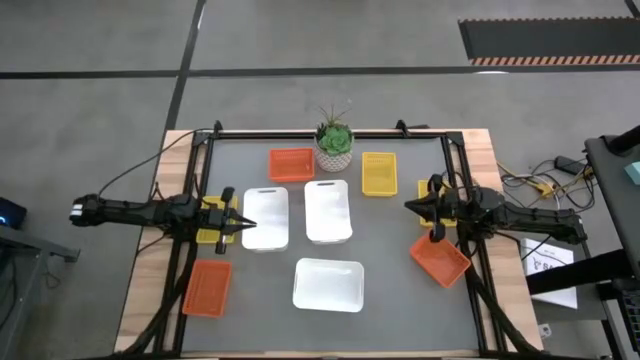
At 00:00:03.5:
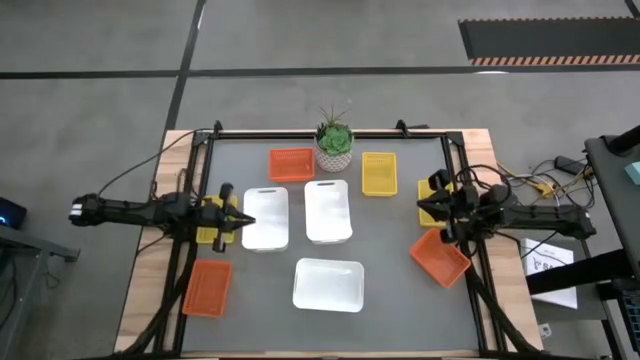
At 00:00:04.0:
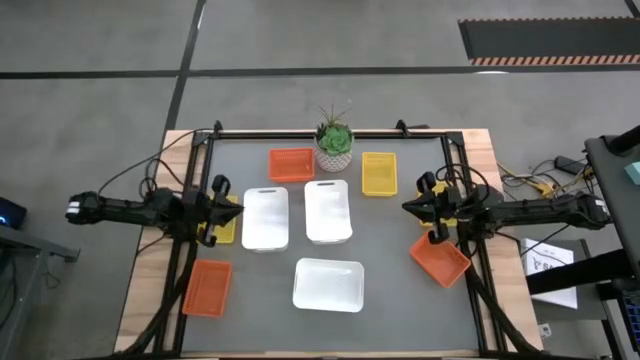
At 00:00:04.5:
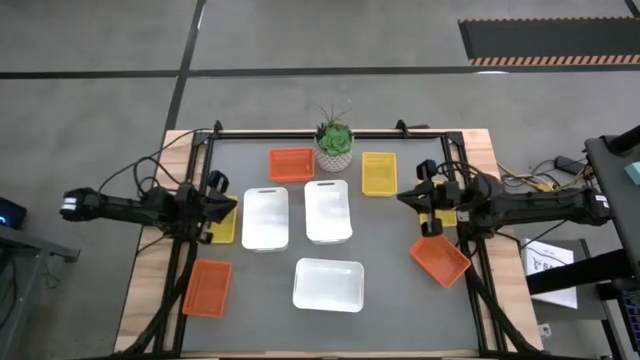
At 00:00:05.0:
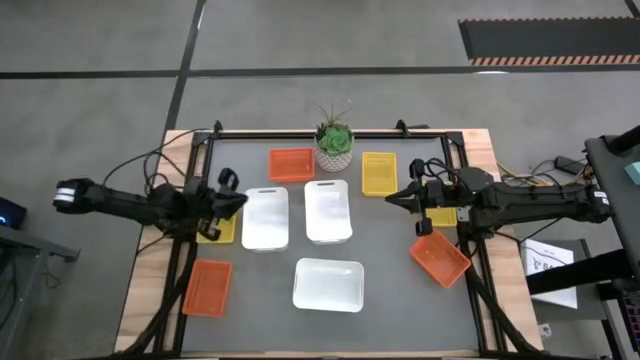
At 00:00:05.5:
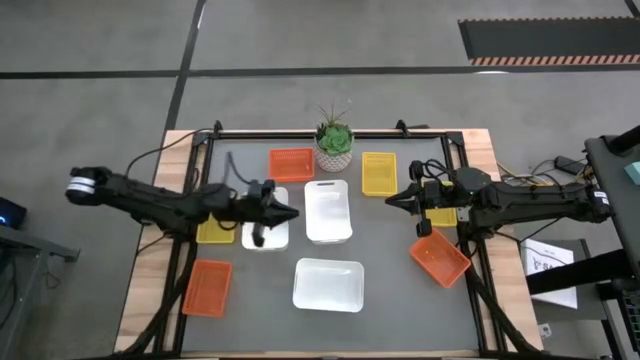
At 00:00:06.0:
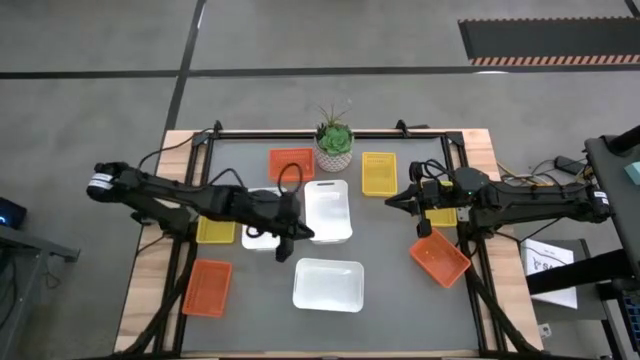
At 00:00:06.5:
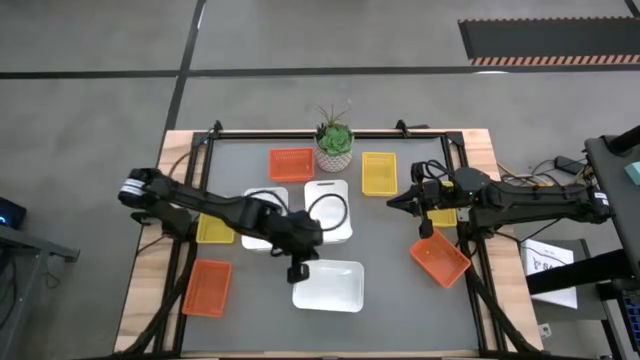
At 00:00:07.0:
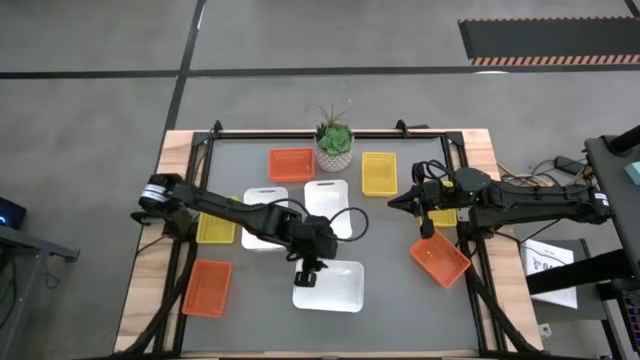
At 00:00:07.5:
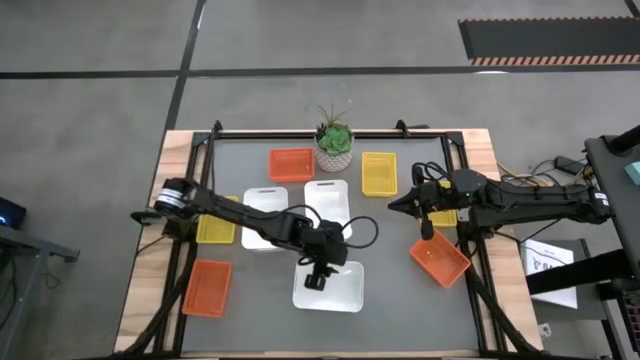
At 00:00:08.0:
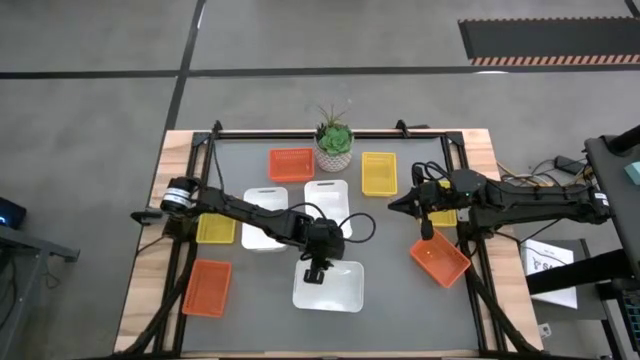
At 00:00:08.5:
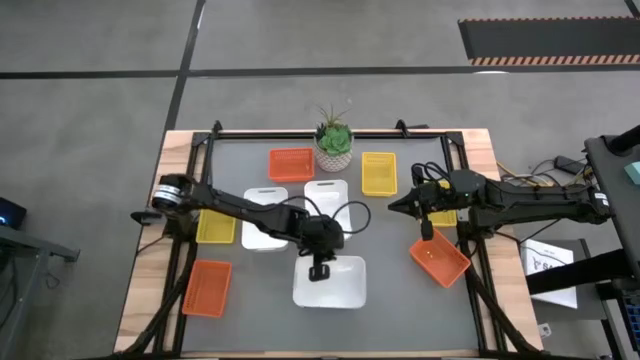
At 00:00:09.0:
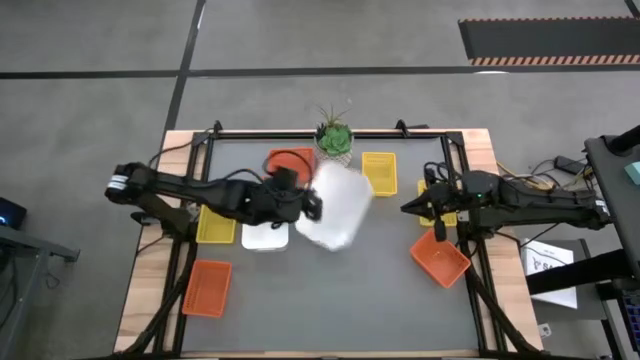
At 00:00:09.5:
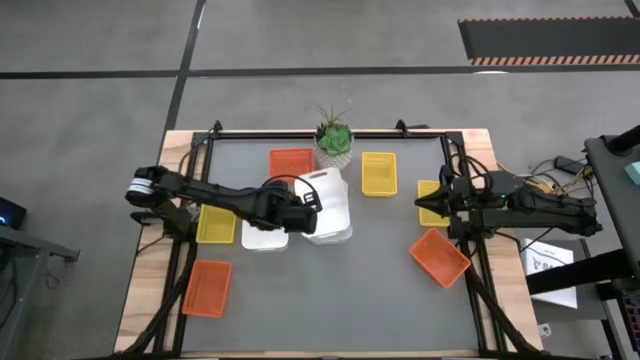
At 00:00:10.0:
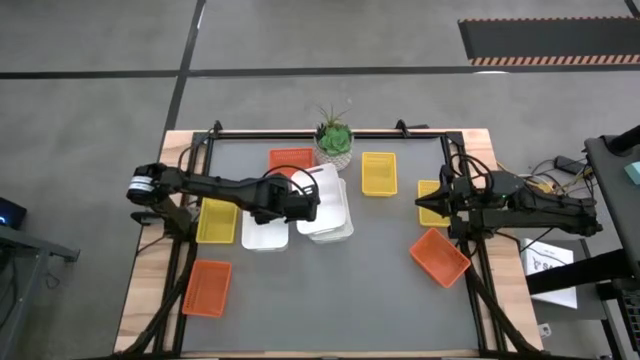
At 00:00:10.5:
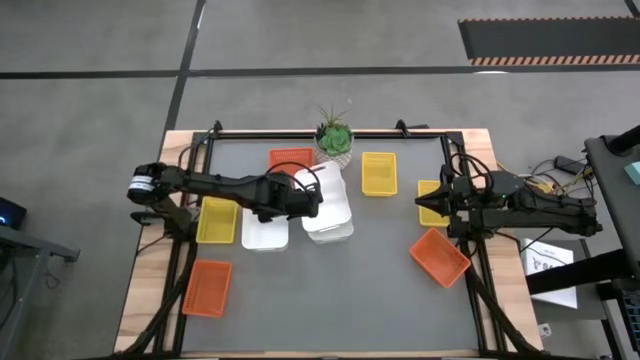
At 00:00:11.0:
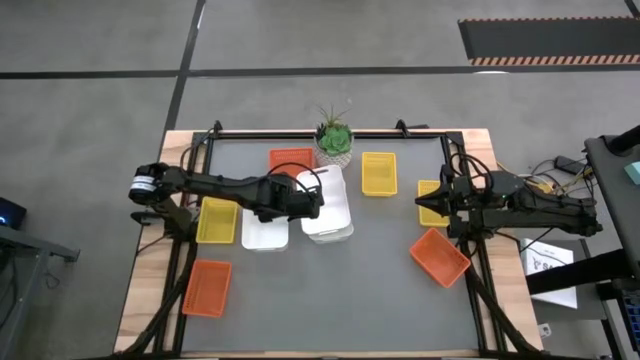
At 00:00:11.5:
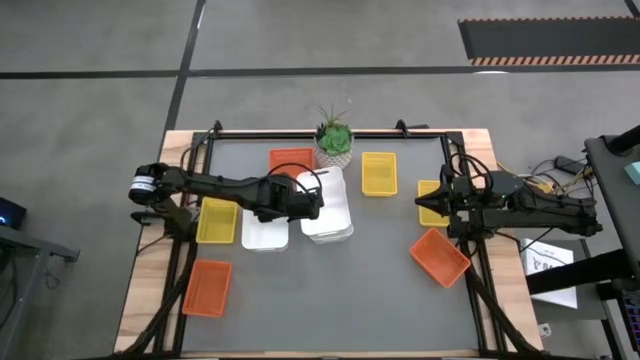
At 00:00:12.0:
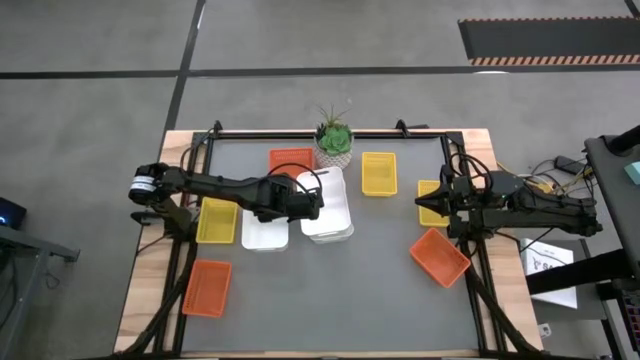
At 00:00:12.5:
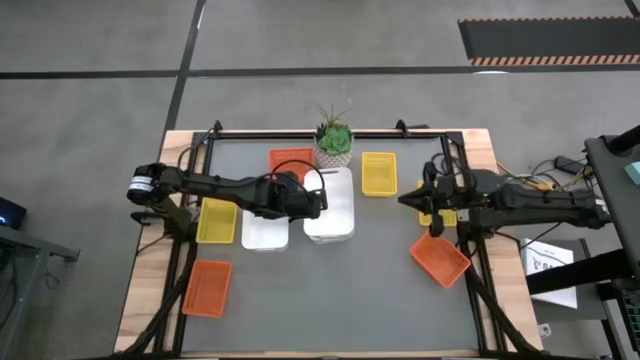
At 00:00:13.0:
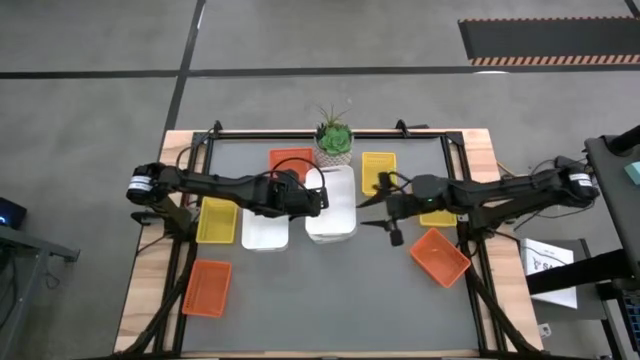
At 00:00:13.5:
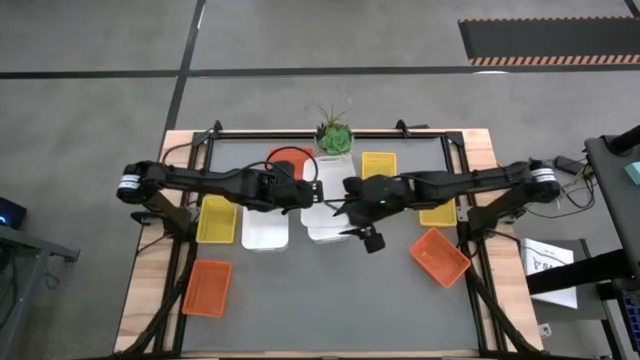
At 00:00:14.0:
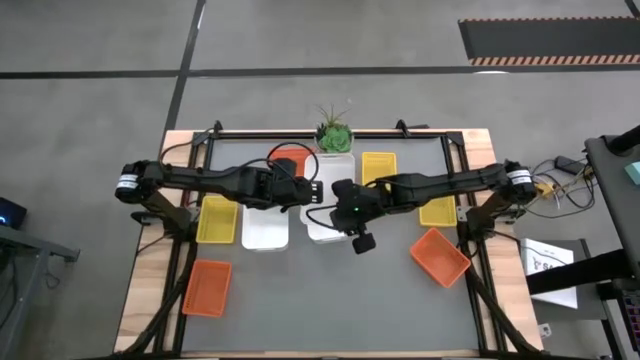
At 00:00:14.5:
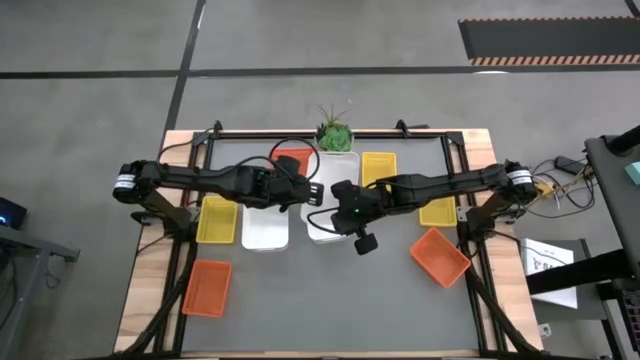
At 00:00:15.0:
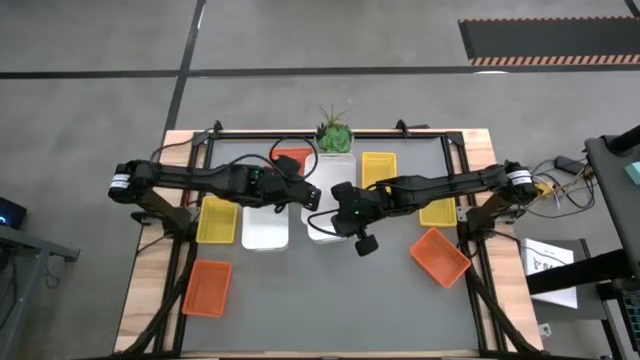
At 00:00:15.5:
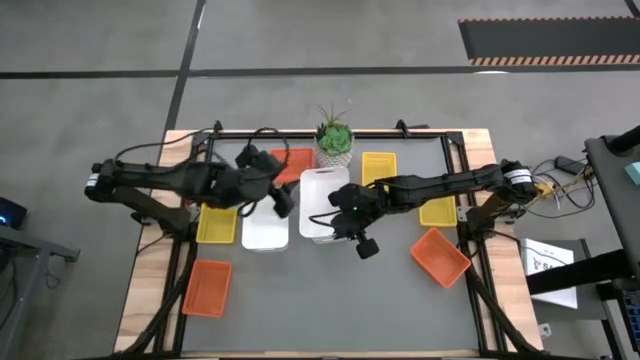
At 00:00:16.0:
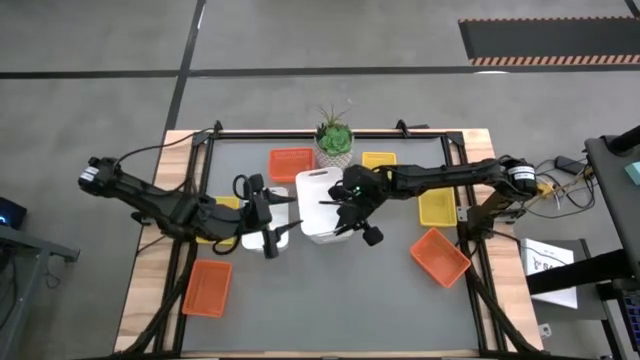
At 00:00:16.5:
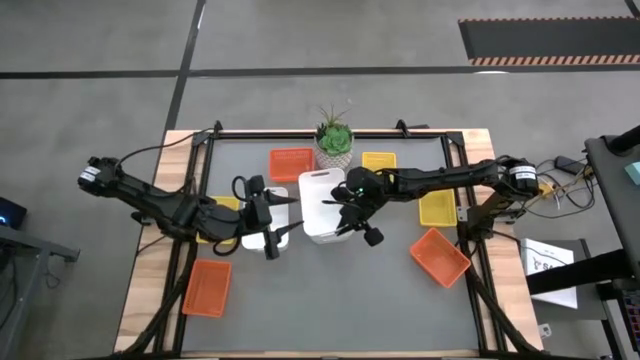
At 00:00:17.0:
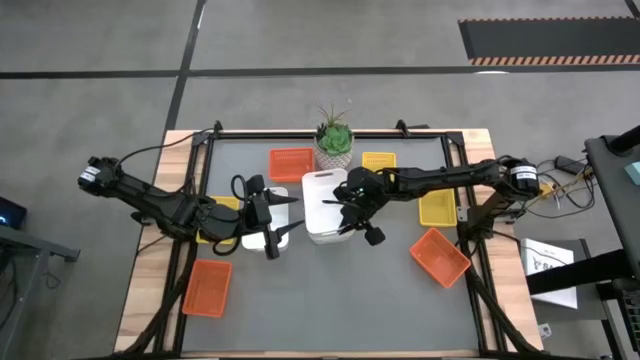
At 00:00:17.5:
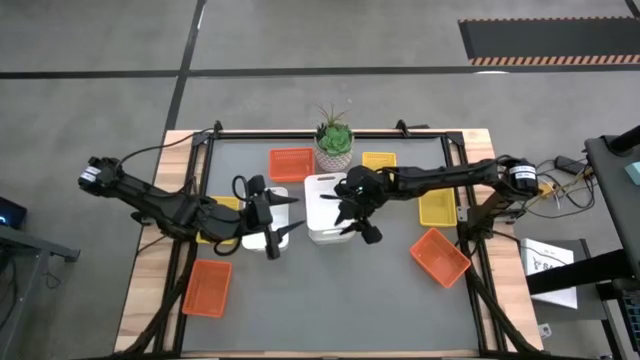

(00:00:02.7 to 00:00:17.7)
Stack the bottom white bin on the top right white bin
